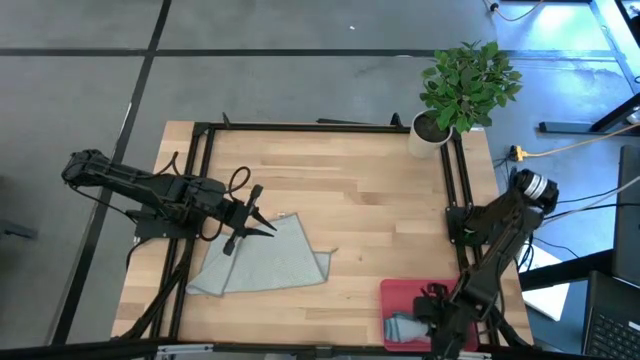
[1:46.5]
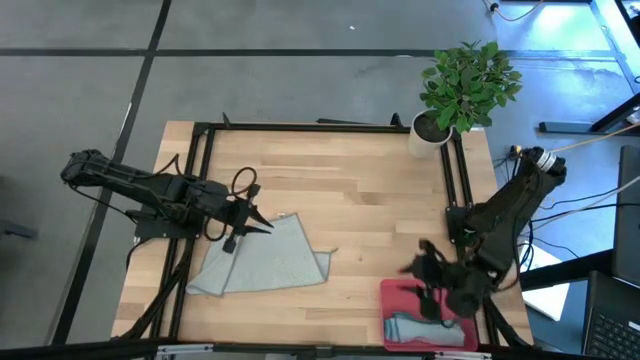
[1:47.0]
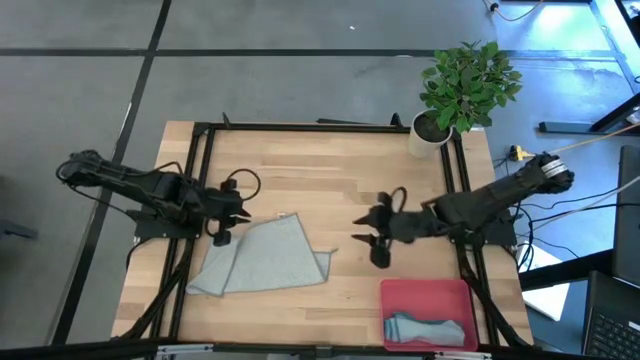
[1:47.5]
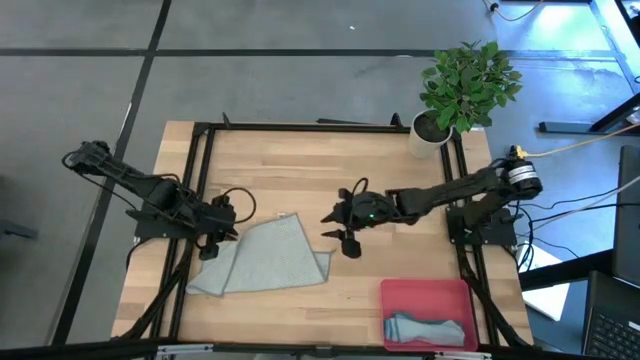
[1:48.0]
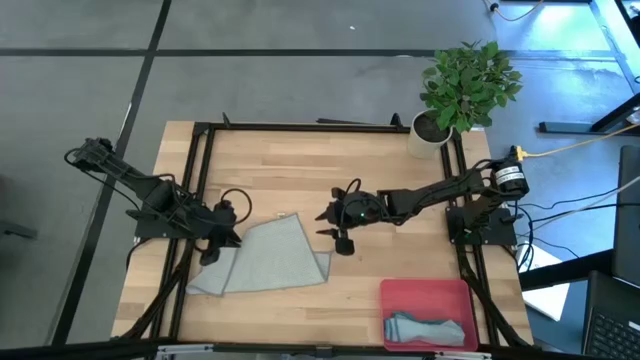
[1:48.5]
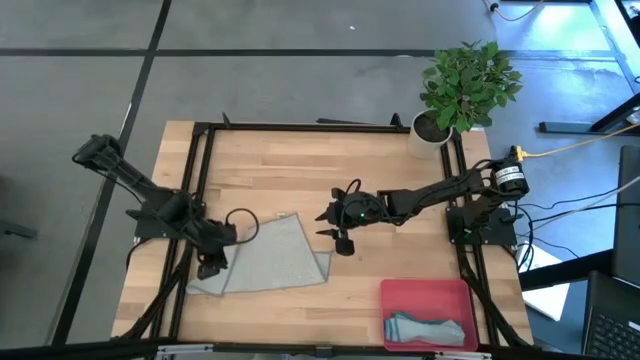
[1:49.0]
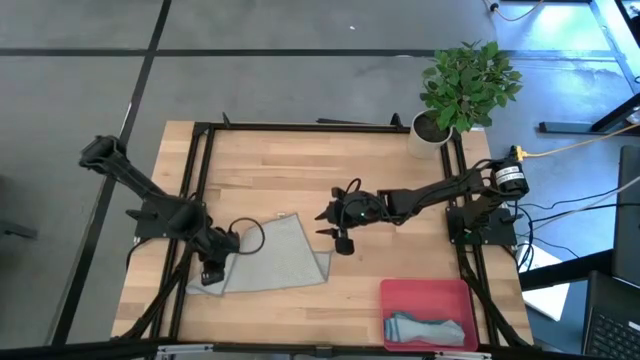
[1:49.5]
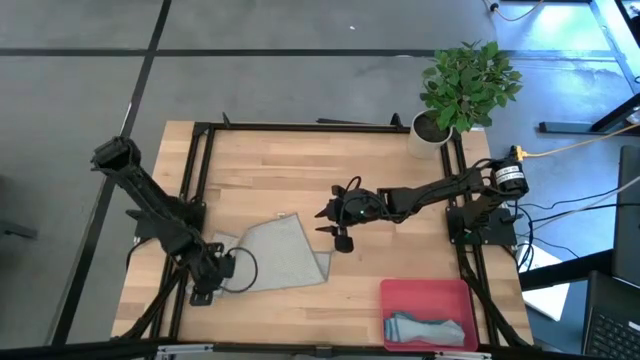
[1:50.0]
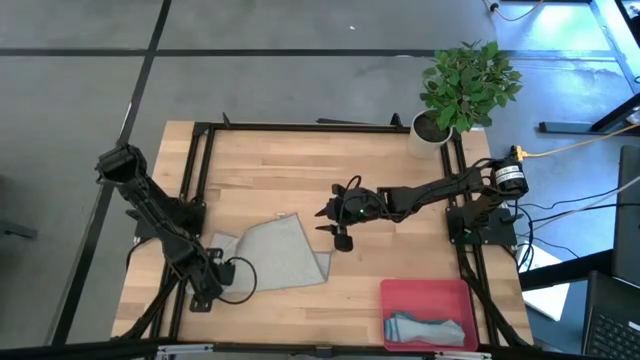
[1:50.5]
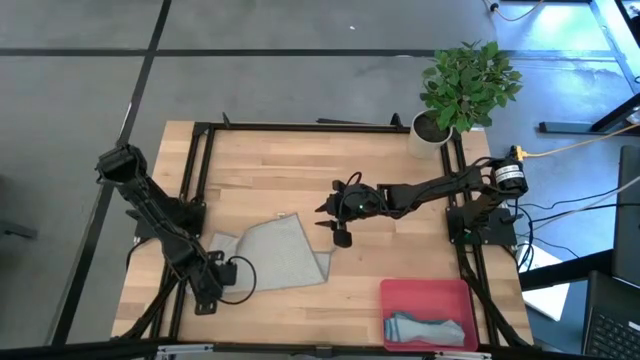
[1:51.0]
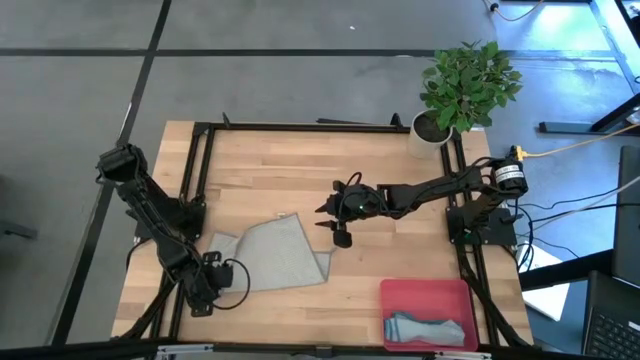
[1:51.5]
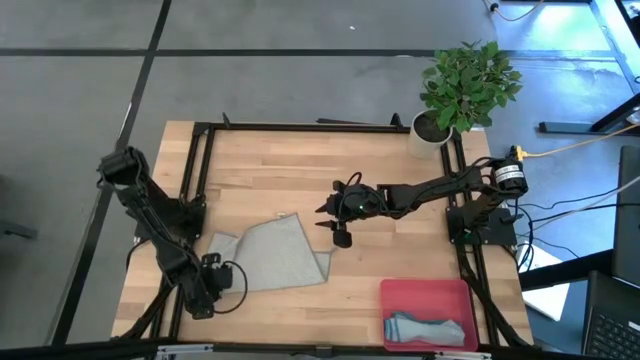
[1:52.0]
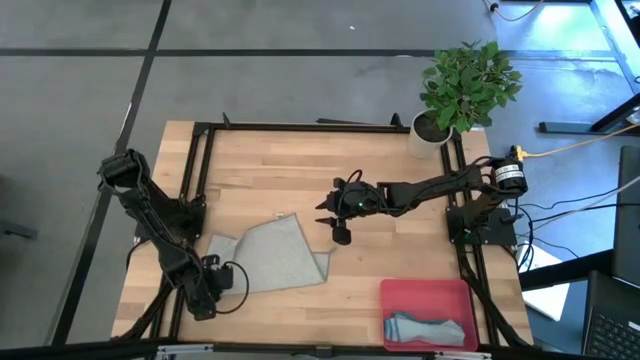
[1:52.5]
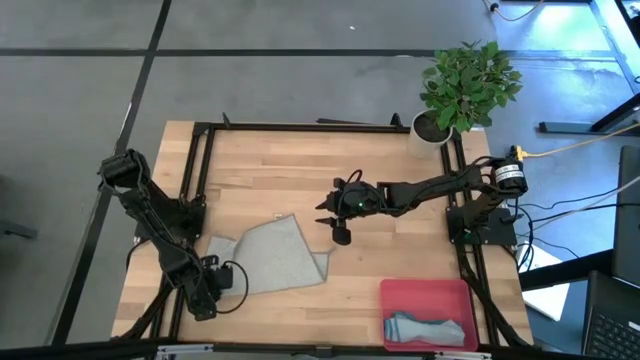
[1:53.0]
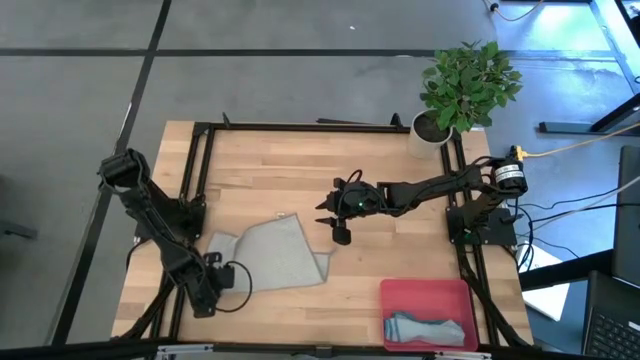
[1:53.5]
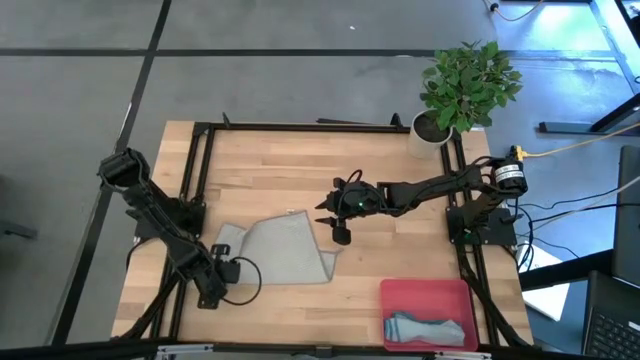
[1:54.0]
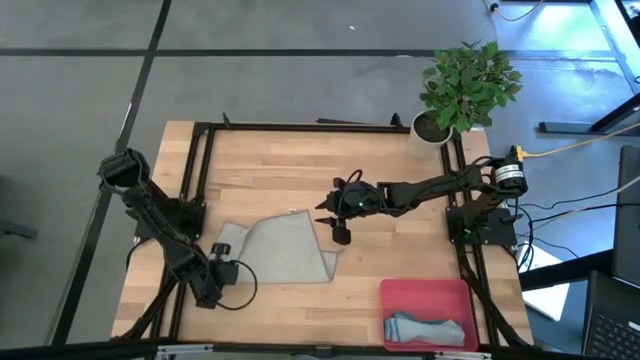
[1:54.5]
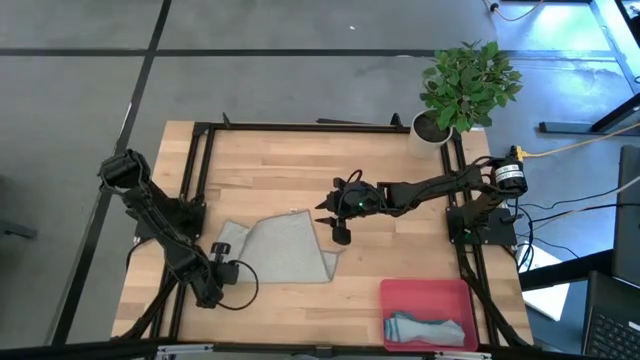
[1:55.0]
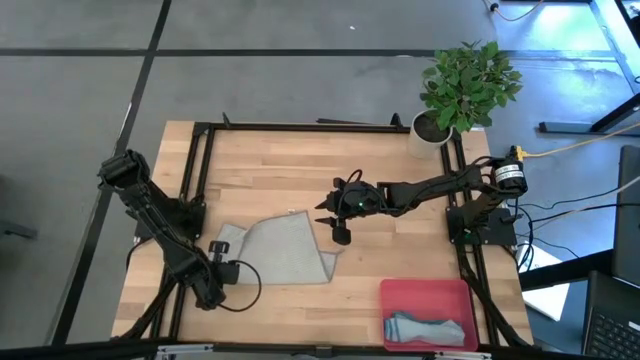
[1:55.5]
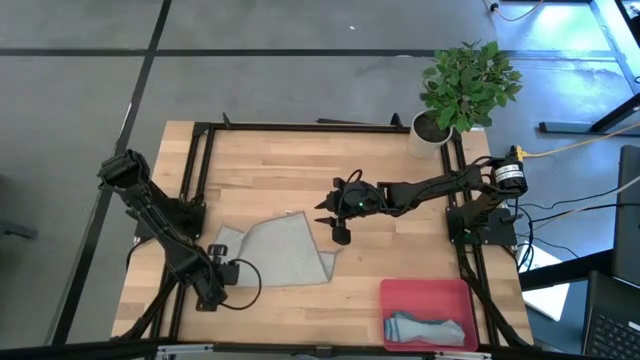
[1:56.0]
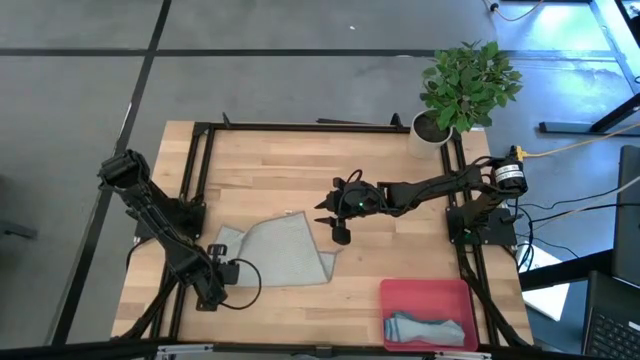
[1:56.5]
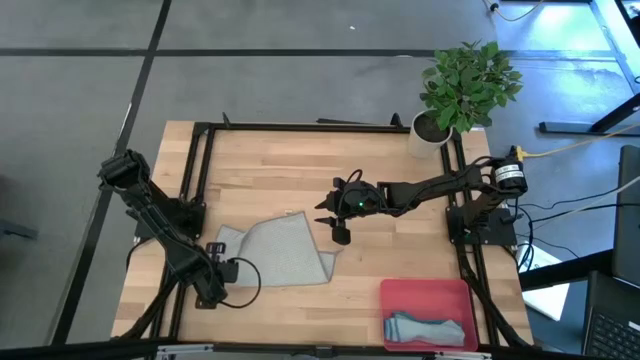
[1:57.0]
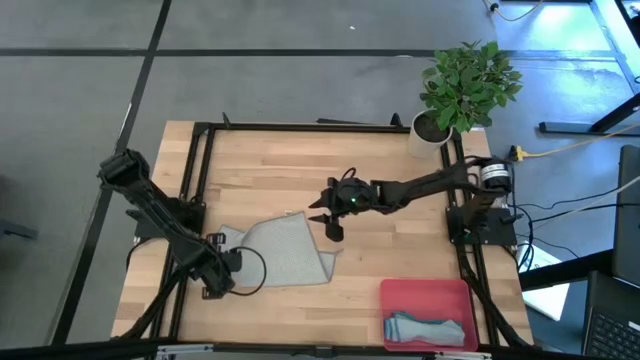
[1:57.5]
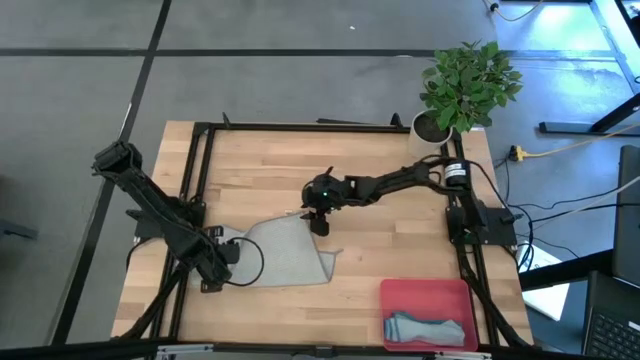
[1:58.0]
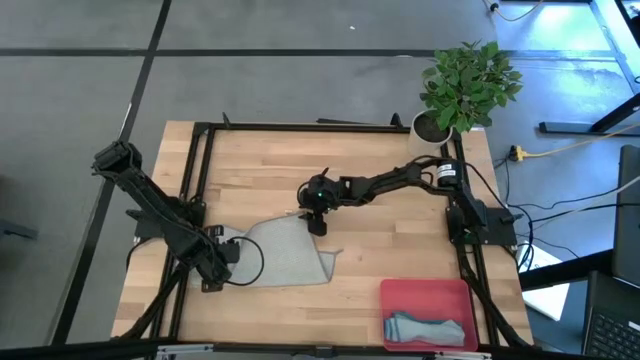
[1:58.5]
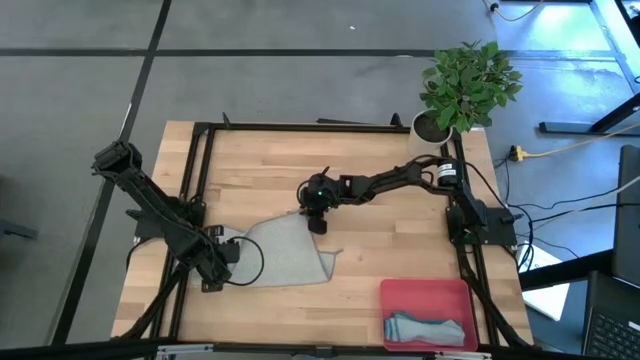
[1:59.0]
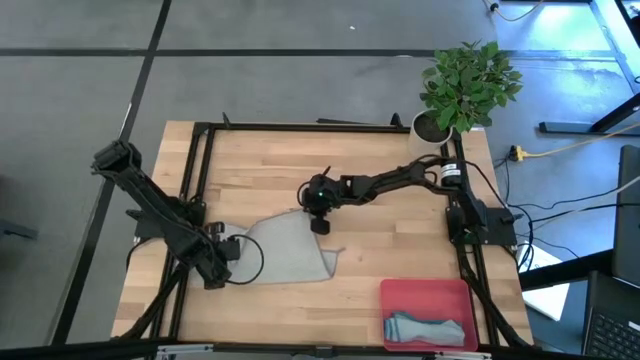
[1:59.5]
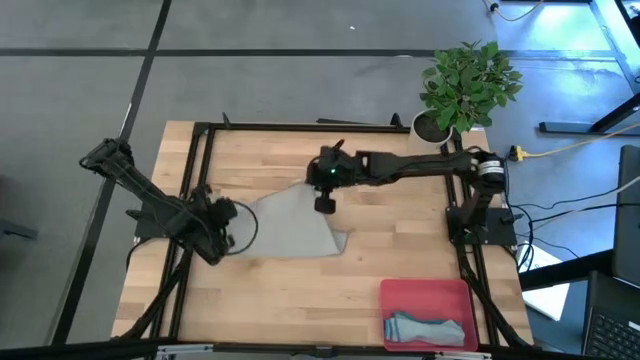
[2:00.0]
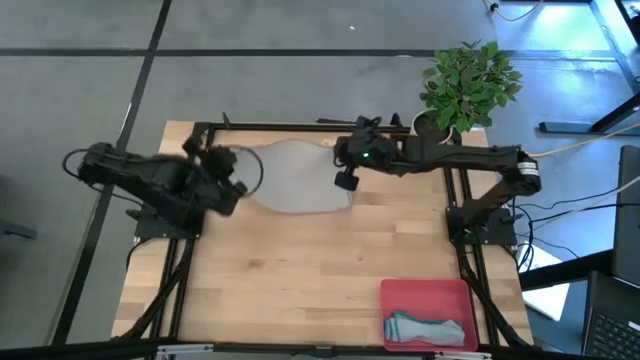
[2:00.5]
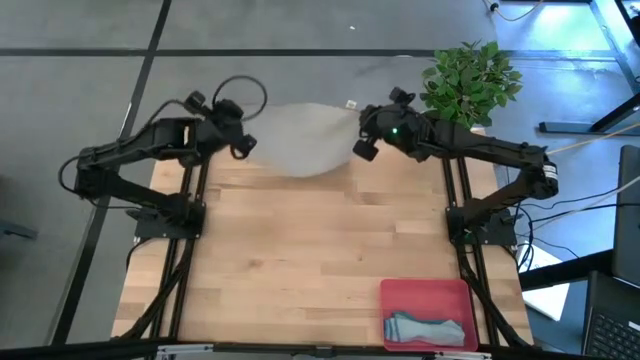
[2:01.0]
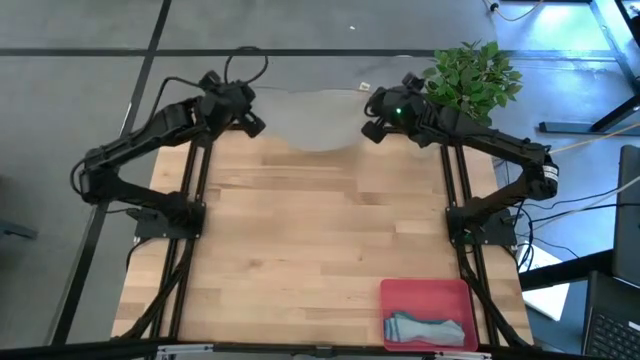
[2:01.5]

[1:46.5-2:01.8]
Task: Roll microfiber towels into tight, uniform cylinder then place into a basket
Fold the gray towel
